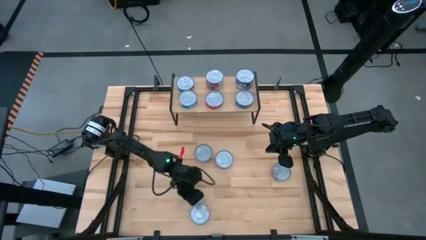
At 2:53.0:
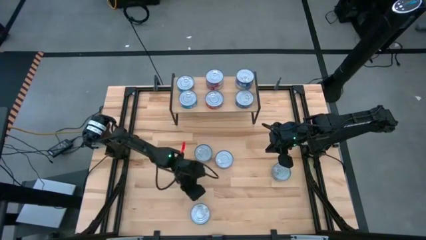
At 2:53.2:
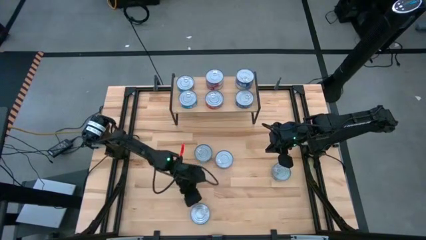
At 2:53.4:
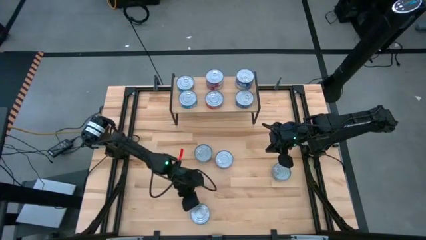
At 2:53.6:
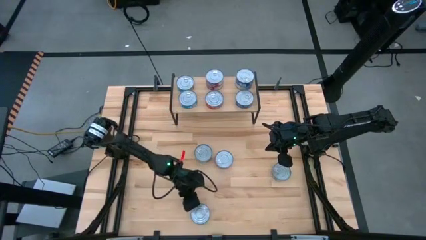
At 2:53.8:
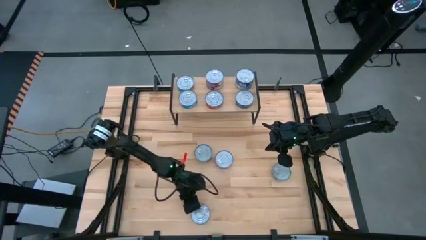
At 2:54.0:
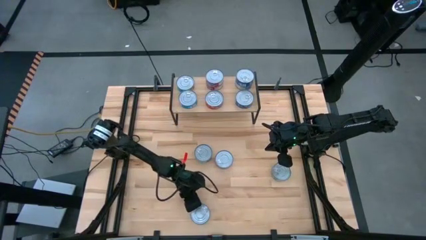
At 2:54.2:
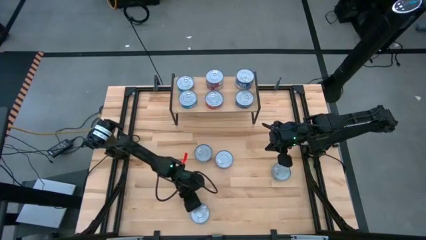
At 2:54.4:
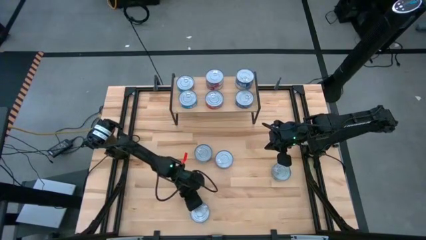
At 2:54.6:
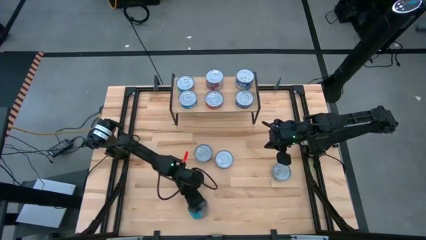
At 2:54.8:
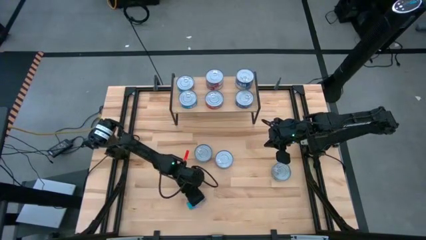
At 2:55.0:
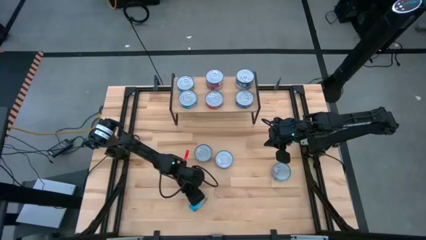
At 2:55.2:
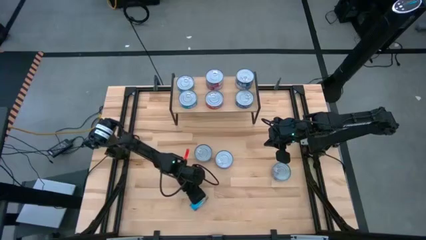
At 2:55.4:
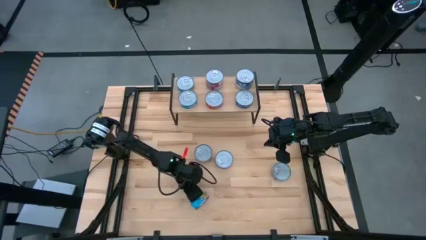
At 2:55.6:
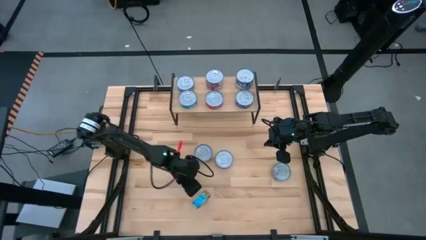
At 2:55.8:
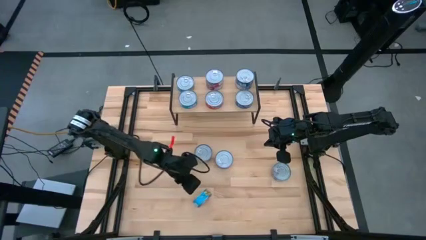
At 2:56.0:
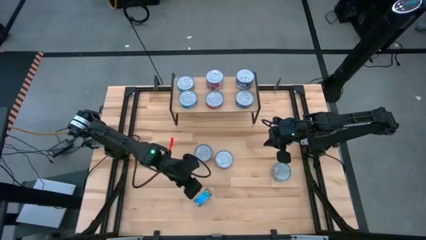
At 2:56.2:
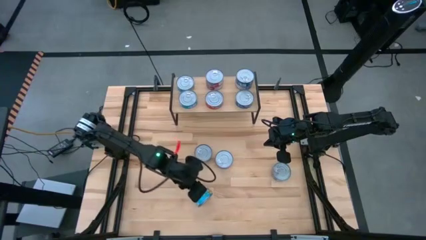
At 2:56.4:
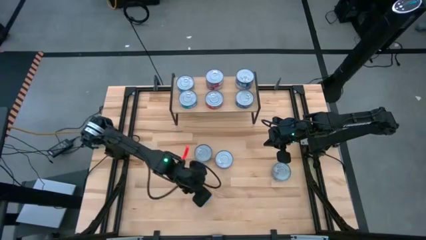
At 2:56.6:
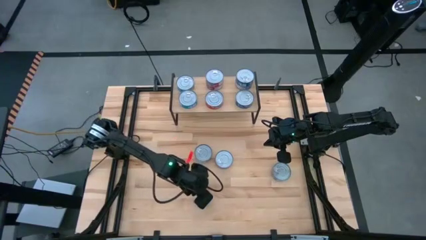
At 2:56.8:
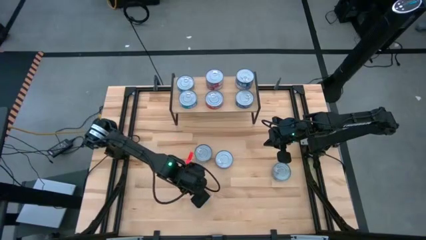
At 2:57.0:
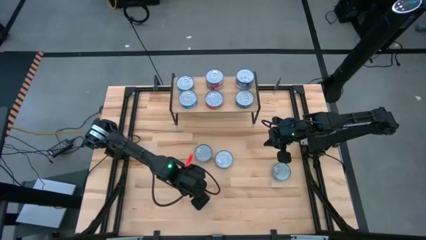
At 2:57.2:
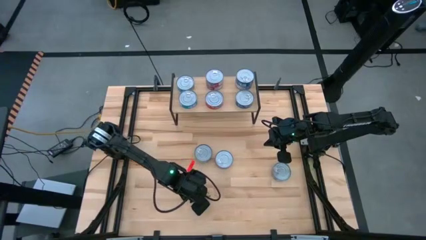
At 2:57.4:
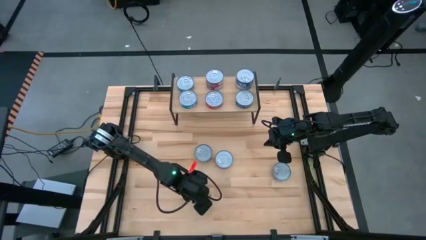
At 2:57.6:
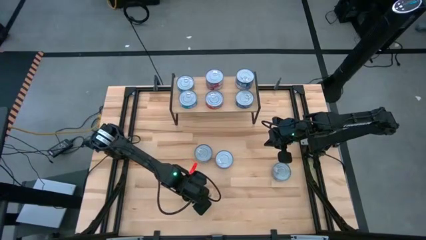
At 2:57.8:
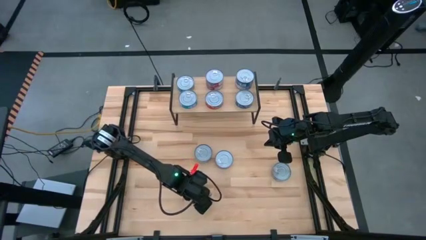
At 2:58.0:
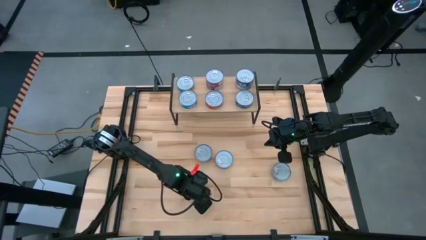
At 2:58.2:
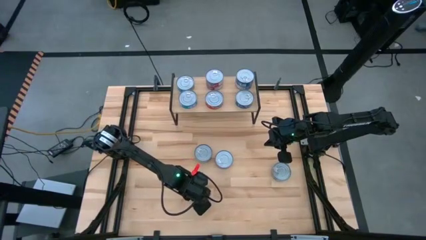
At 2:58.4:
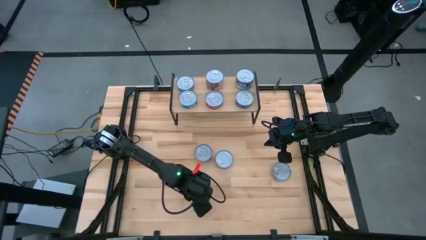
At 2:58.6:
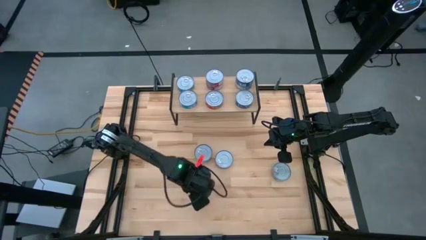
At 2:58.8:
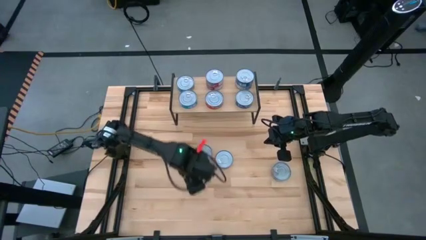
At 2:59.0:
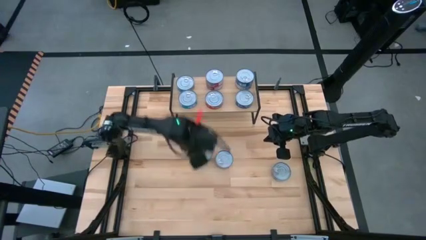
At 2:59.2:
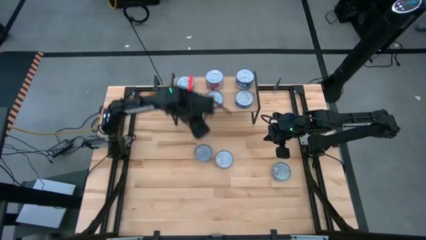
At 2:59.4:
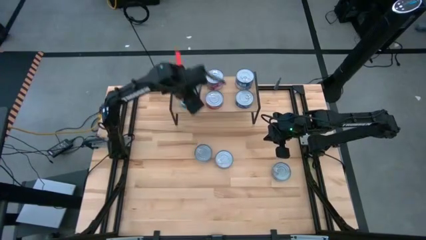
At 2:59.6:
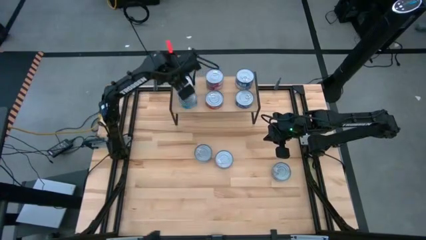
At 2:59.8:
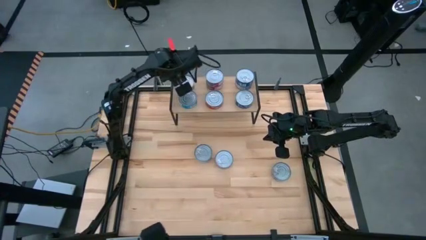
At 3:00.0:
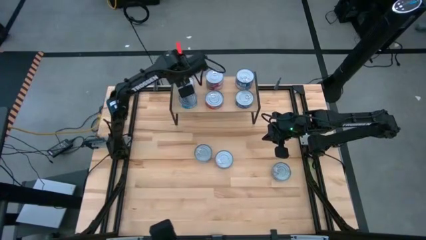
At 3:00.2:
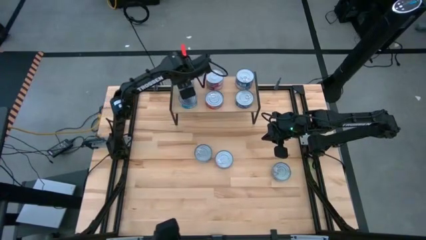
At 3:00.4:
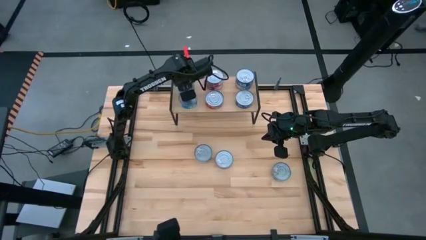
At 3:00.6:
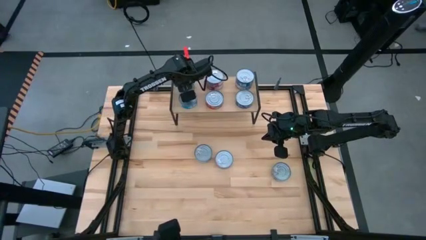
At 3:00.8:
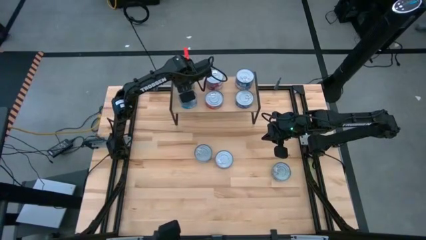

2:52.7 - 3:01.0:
Task: Stack canned seafood by type on shelf
Stack the bottom yellow and blue tuna can on top of the other yellow and blue tuna can on the shelf

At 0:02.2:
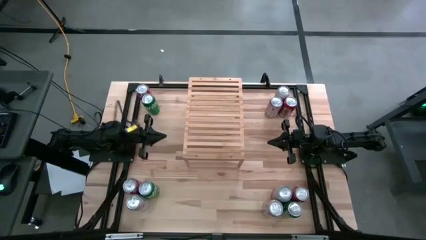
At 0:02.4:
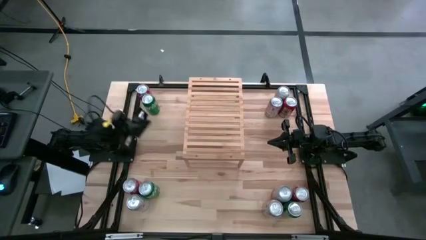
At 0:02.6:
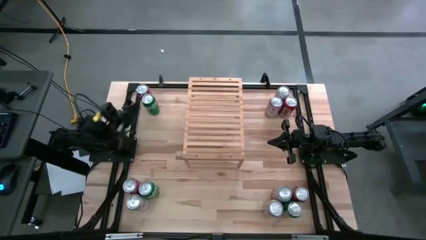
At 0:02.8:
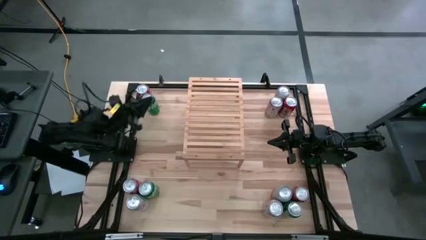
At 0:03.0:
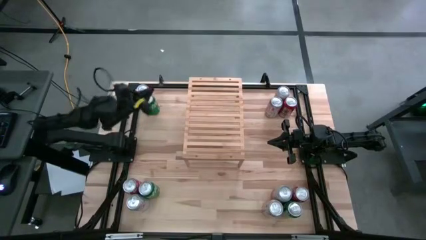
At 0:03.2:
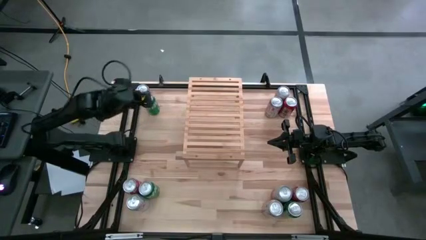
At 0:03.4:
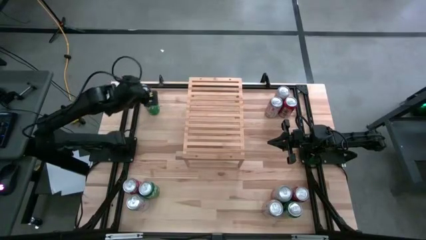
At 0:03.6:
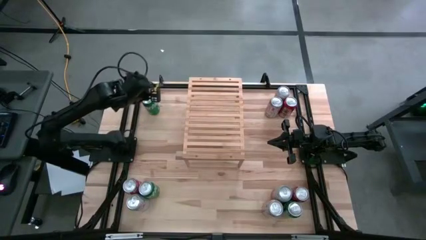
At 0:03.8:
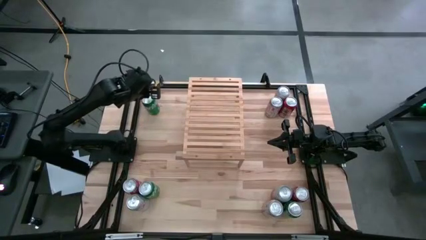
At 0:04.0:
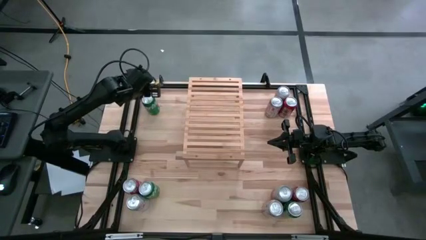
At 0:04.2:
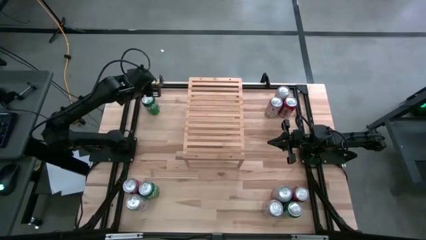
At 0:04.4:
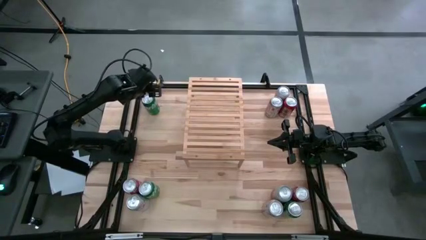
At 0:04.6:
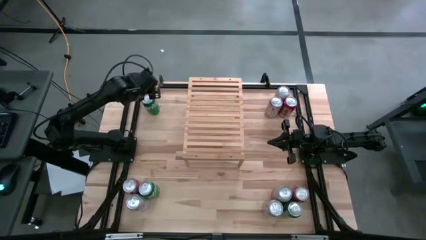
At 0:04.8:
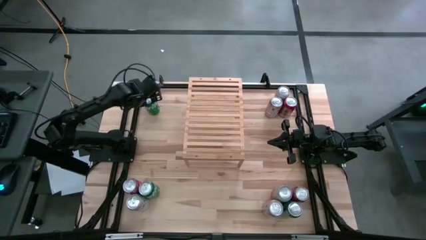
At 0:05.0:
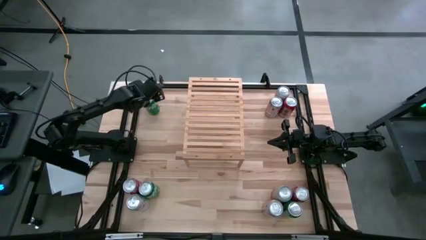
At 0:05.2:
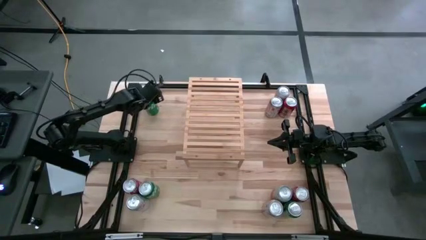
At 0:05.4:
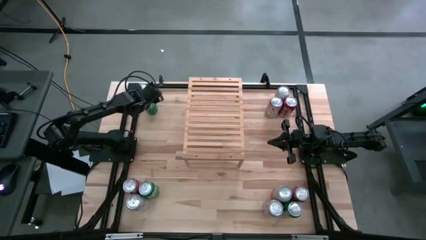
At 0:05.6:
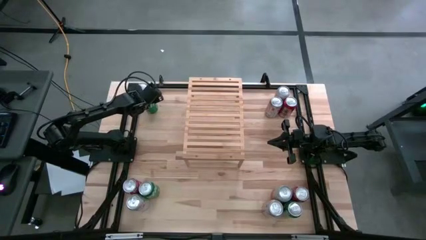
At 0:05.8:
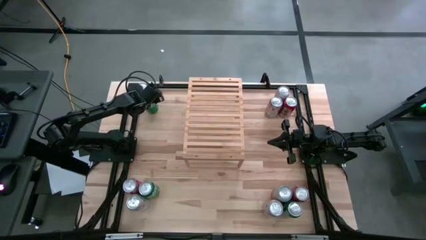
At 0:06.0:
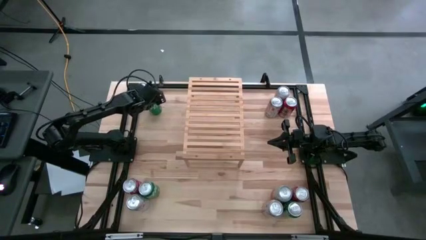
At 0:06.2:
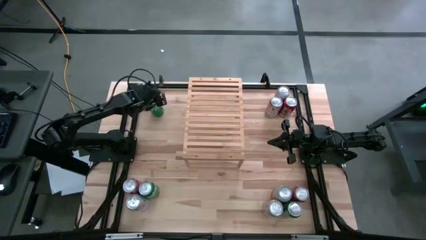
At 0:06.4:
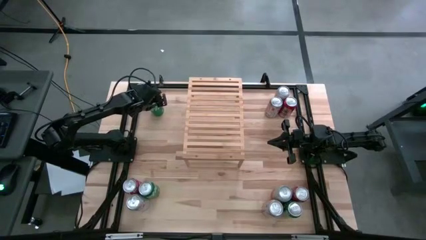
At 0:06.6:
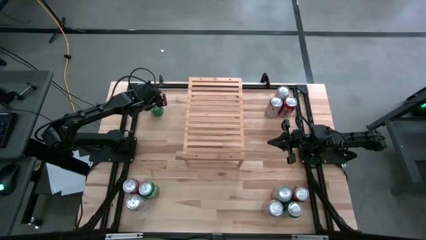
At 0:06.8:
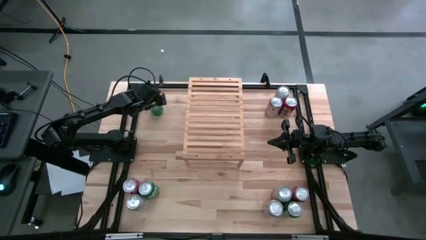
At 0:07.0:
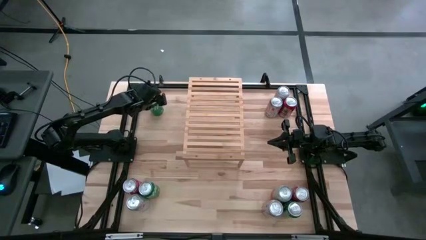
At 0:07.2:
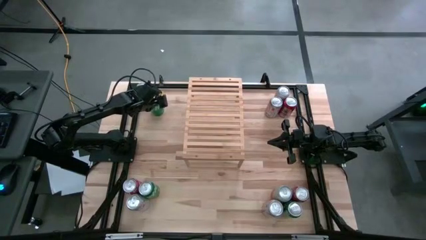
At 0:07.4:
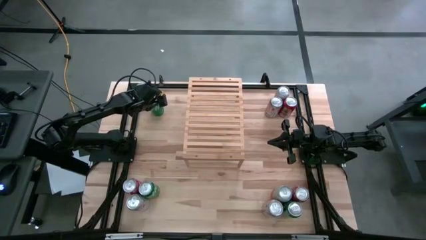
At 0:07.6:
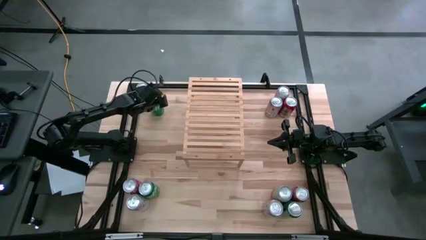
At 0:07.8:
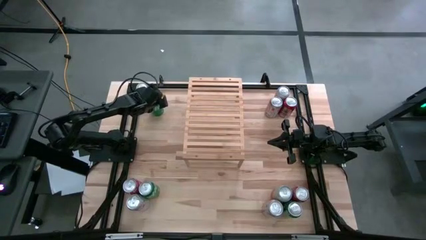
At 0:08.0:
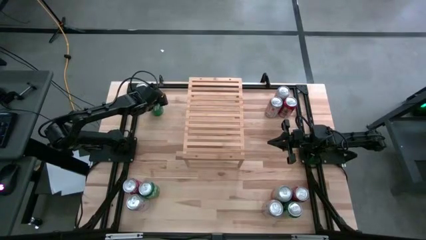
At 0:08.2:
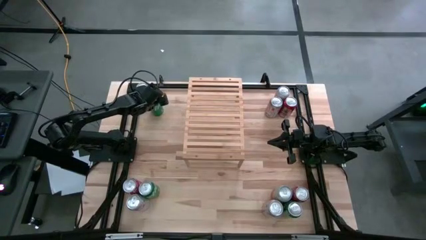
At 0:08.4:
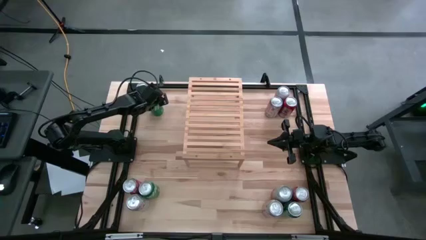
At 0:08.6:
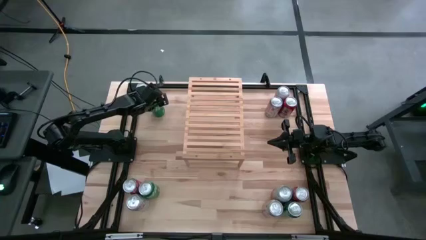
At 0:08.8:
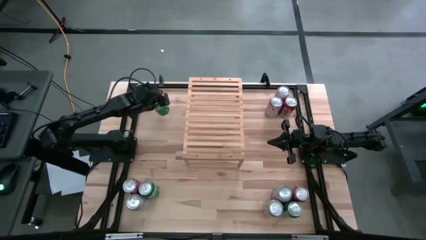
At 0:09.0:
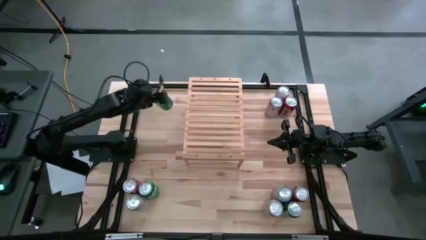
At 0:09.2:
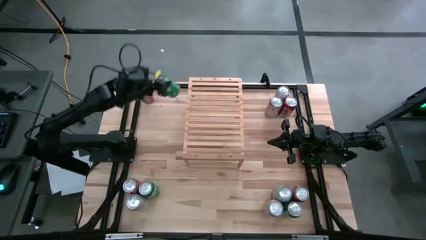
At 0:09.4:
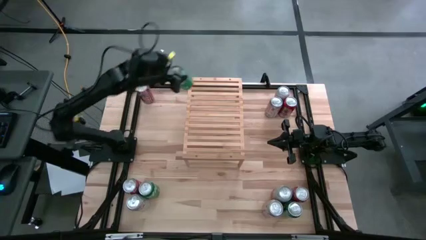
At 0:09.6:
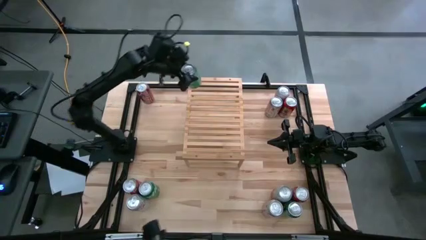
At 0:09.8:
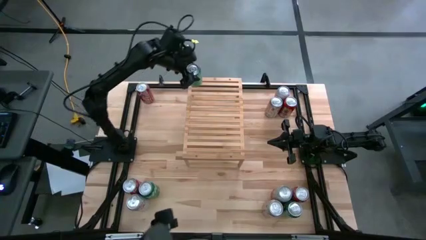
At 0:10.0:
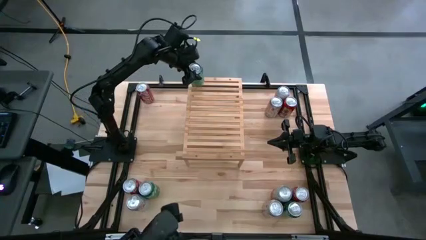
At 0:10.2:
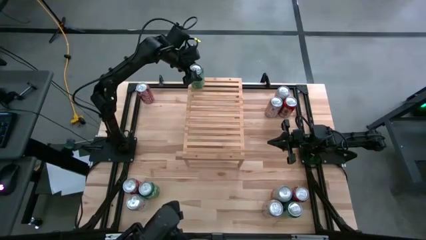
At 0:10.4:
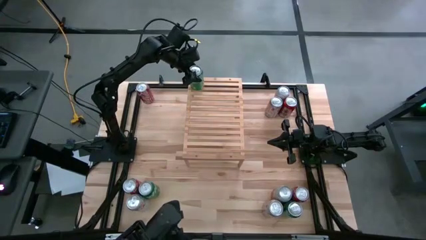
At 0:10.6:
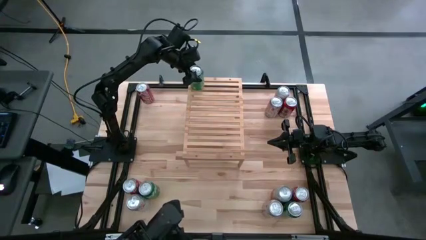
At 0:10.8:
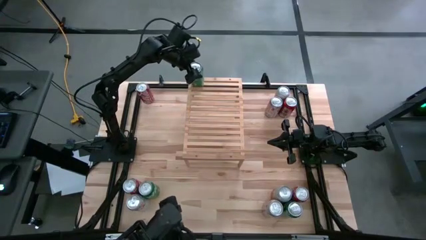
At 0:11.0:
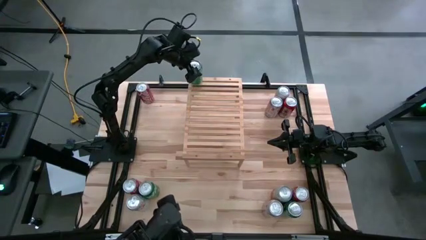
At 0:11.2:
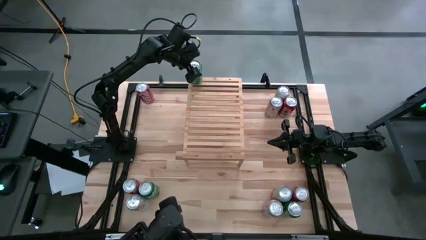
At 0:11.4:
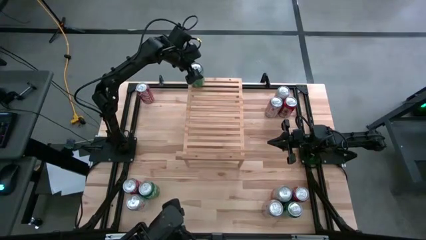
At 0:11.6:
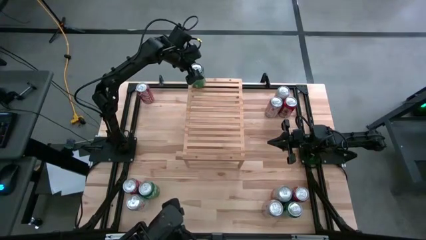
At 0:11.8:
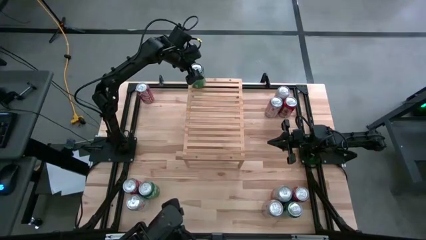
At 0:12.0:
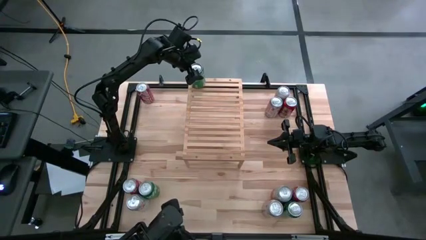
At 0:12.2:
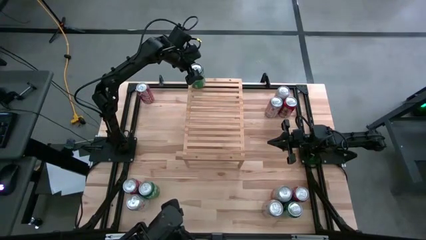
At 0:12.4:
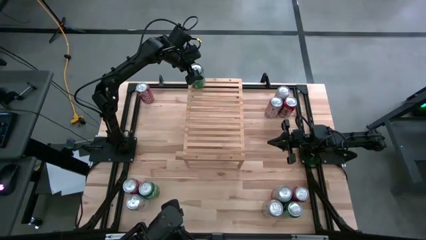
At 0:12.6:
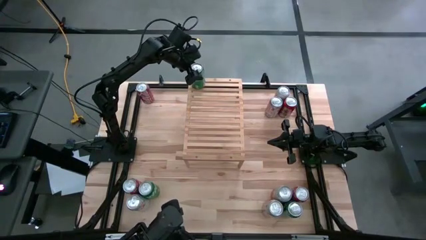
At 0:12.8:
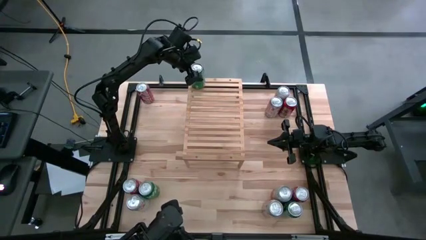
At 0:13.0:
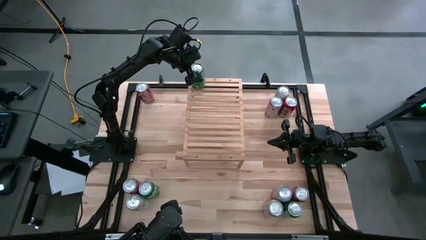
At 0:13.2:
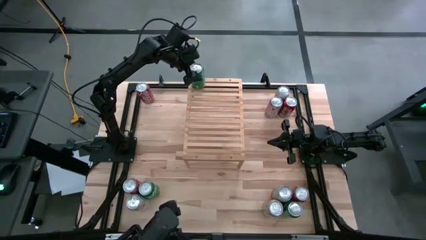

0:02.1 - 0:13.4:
Task: Place canned beverage on shelf
Put the top green soda can on the shelf
